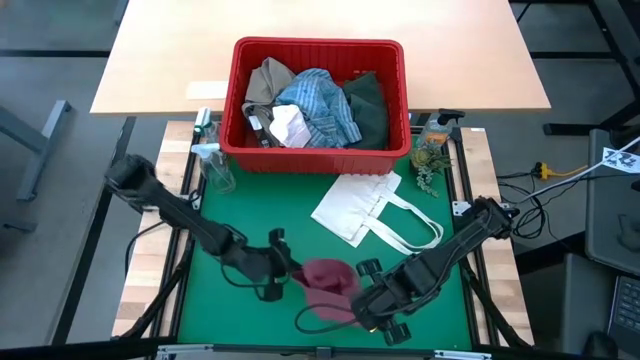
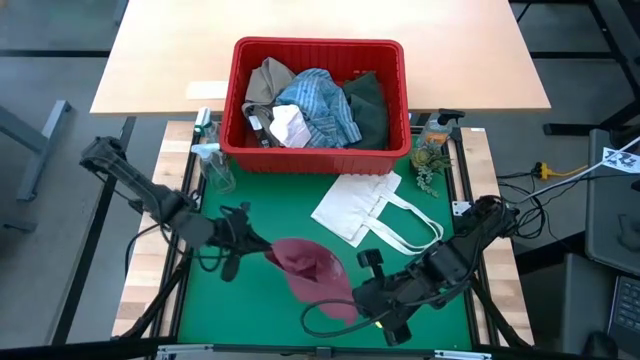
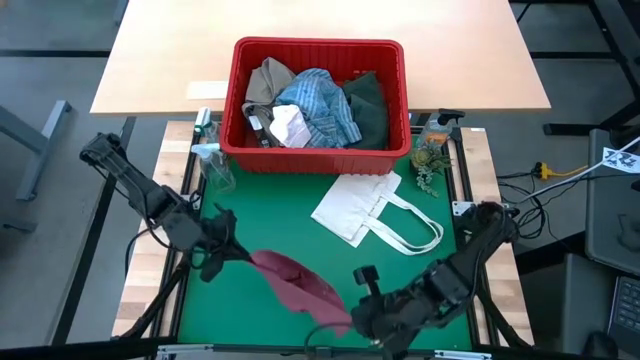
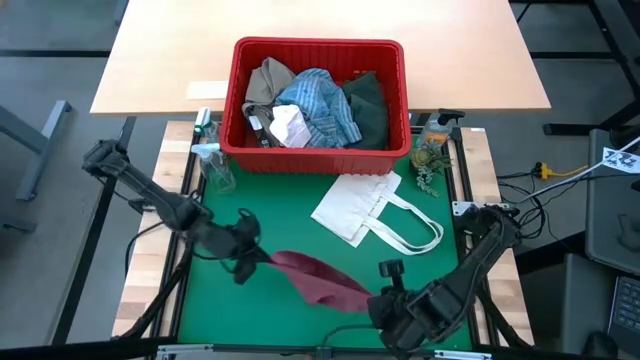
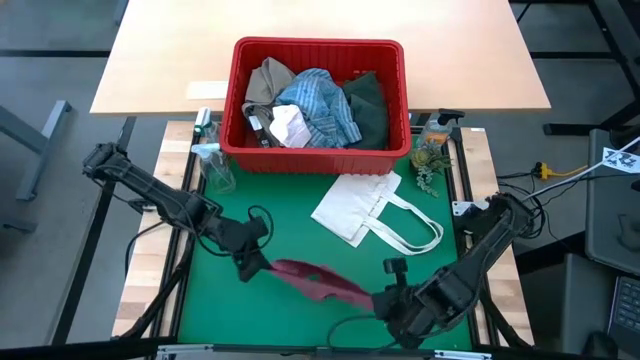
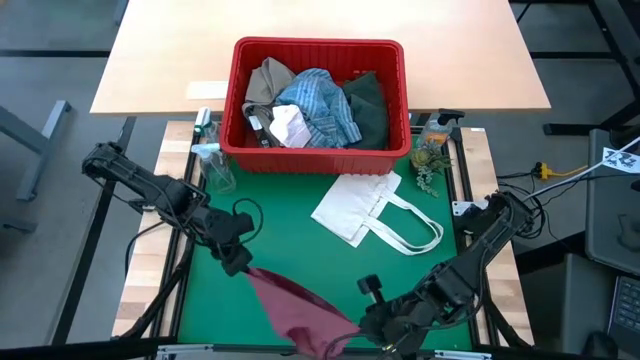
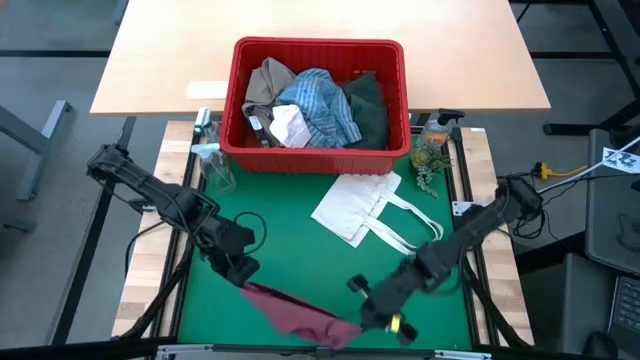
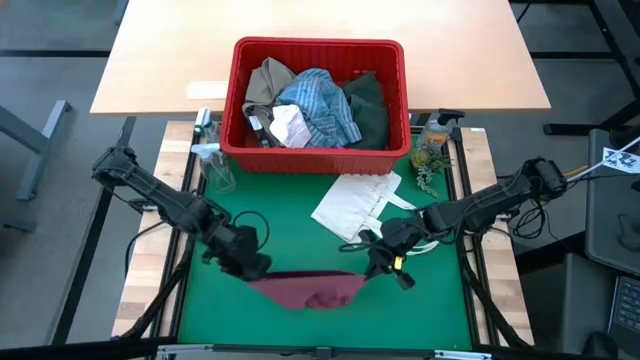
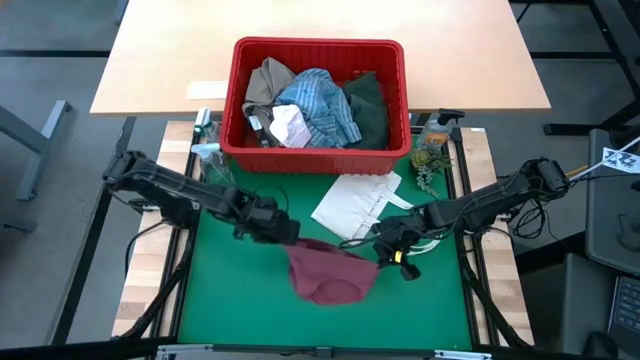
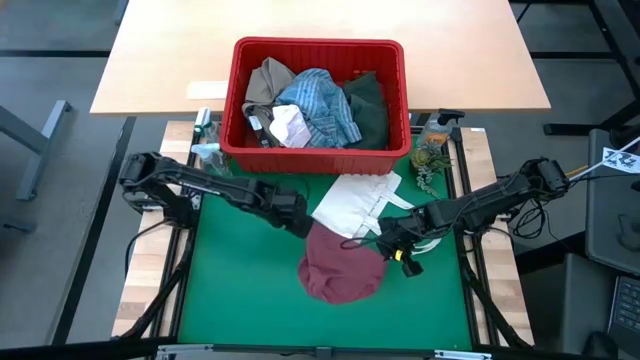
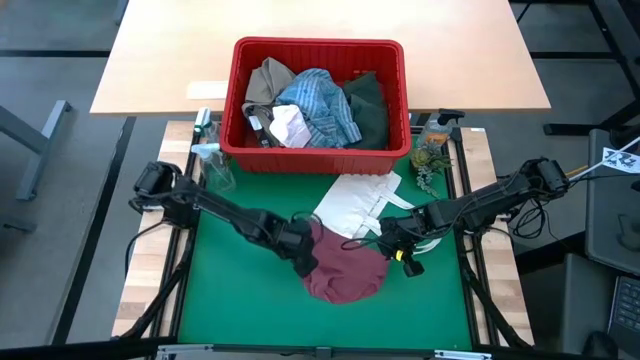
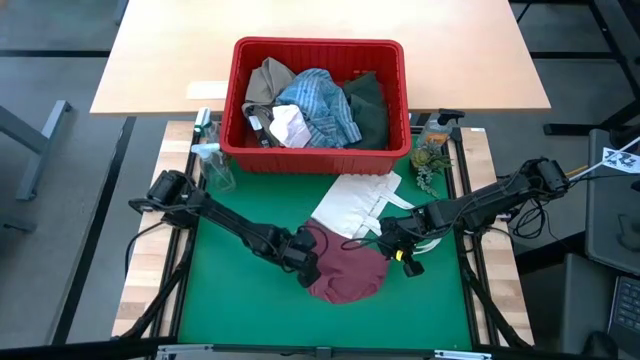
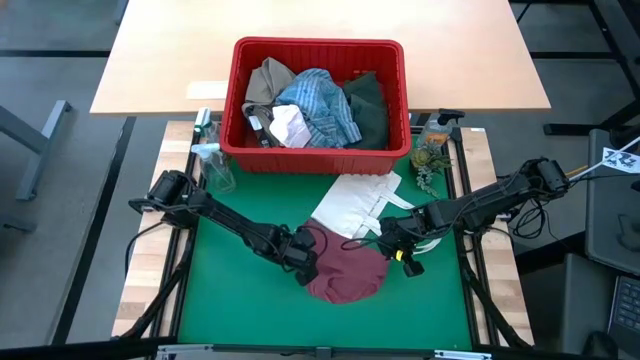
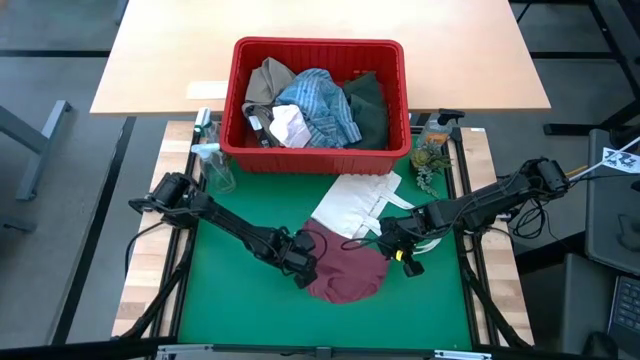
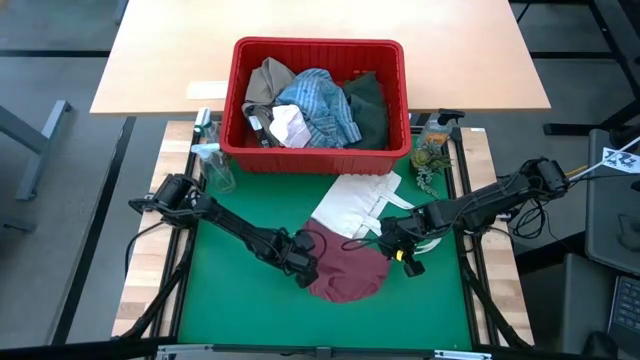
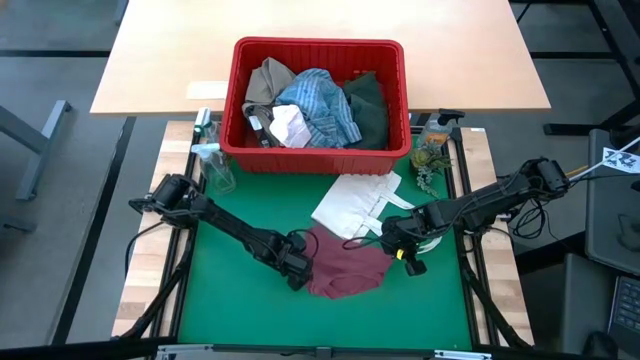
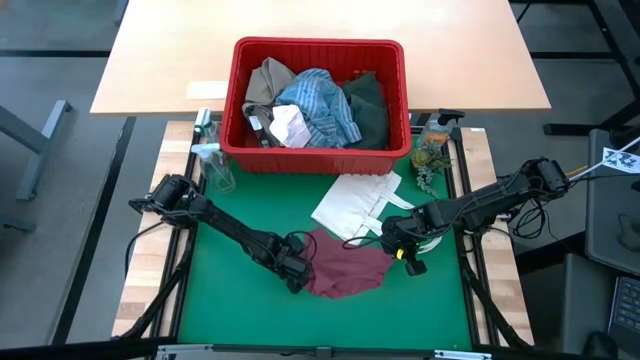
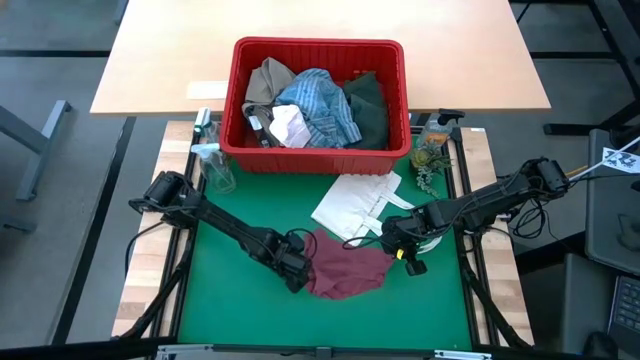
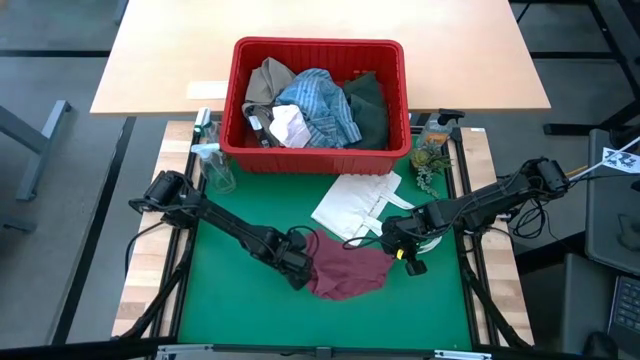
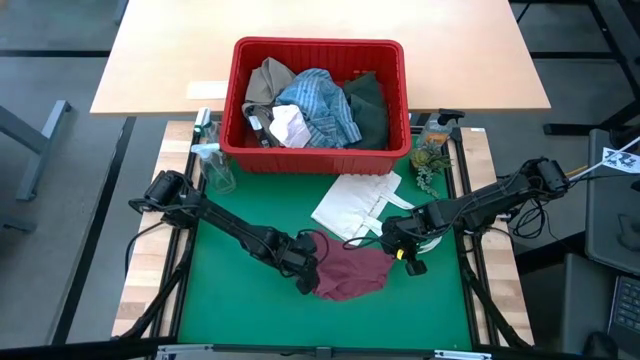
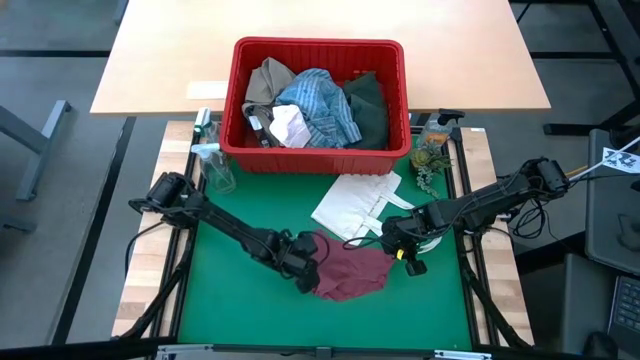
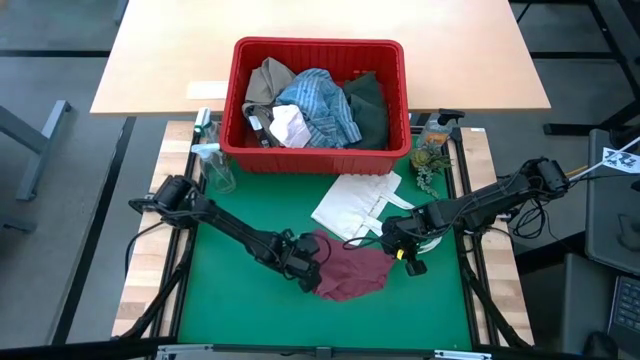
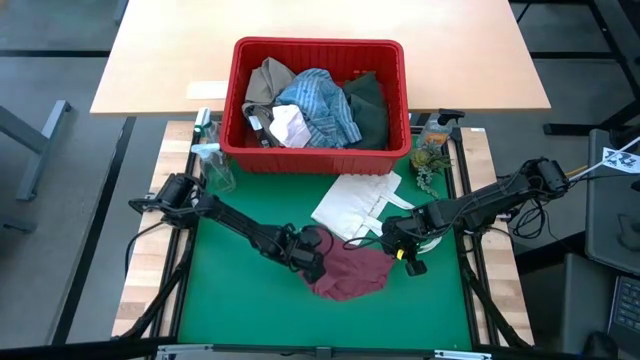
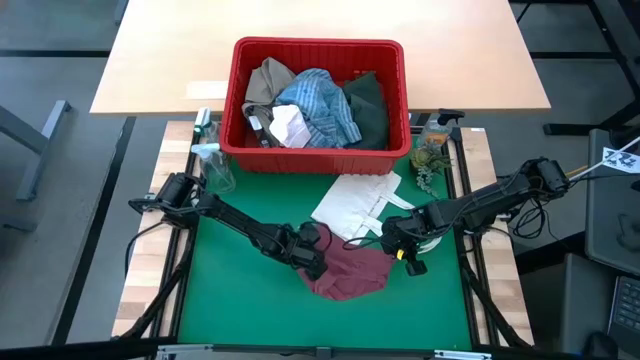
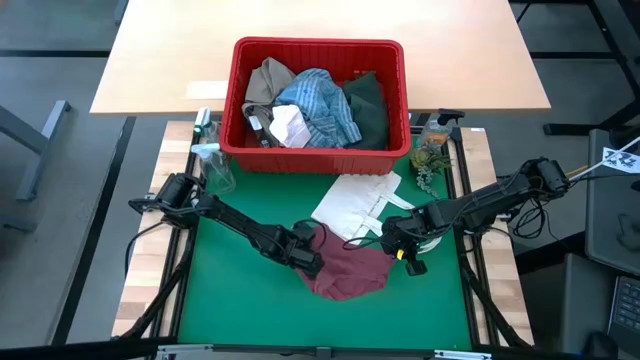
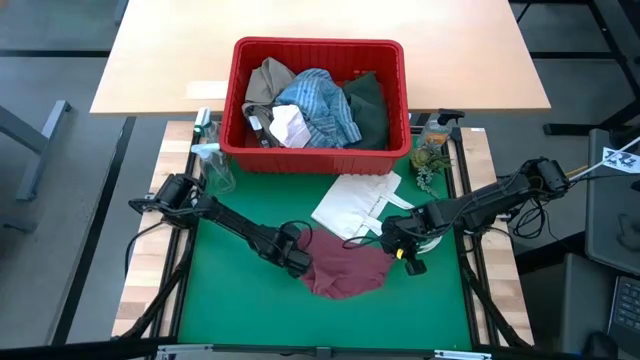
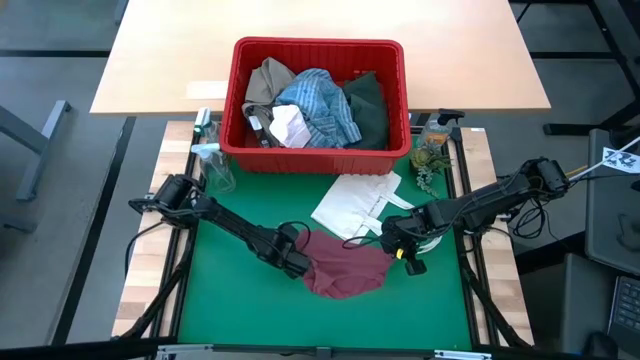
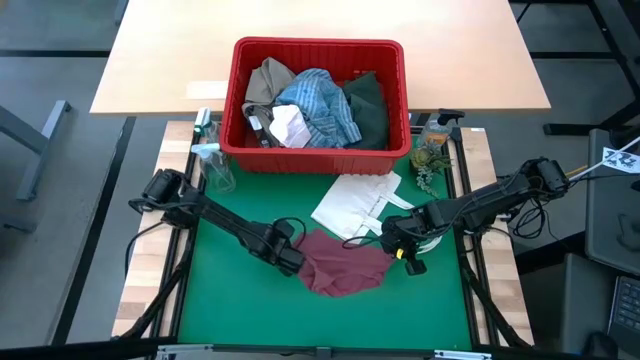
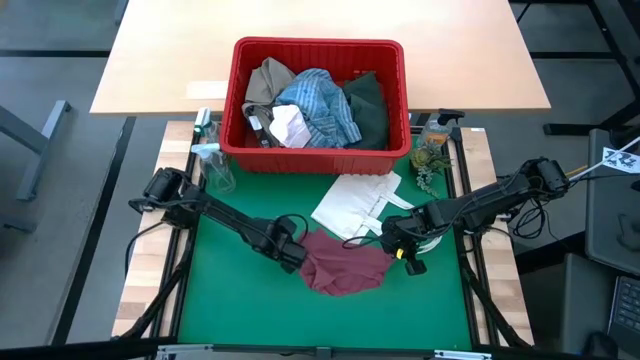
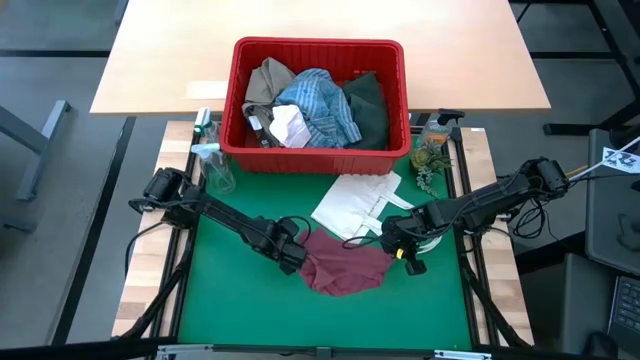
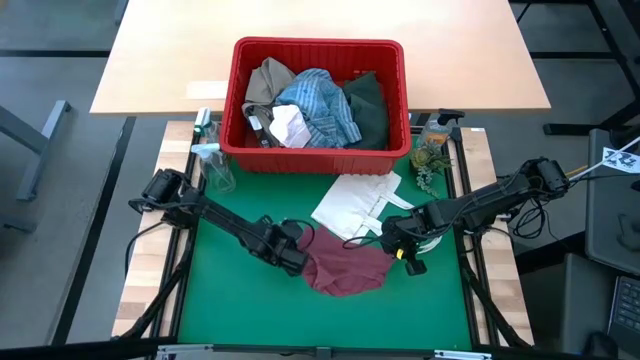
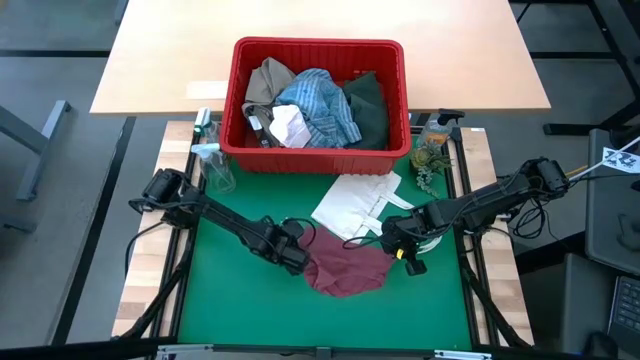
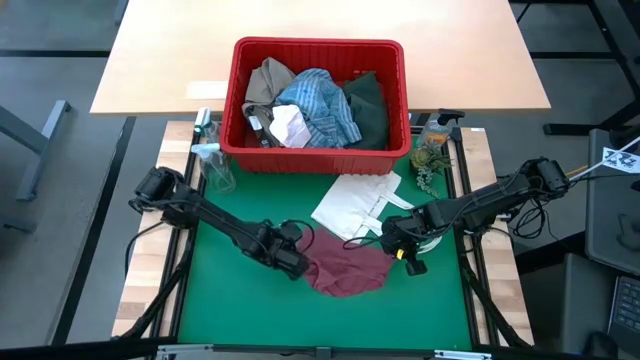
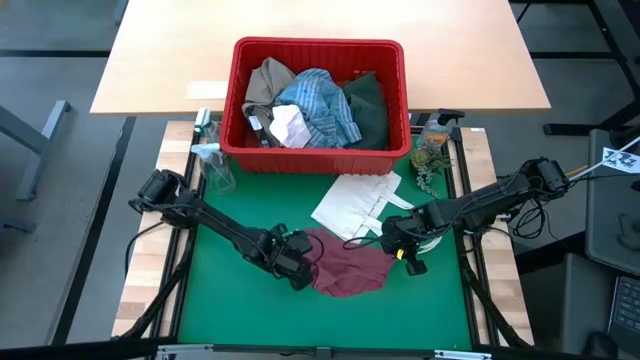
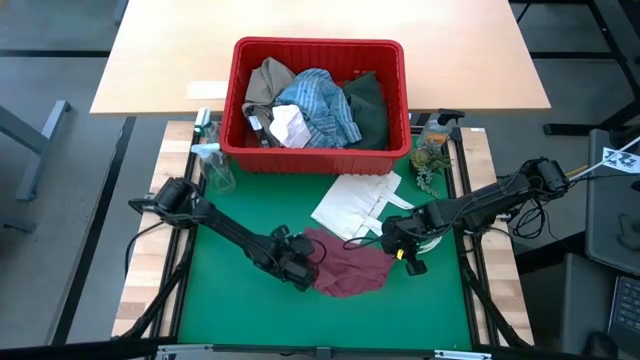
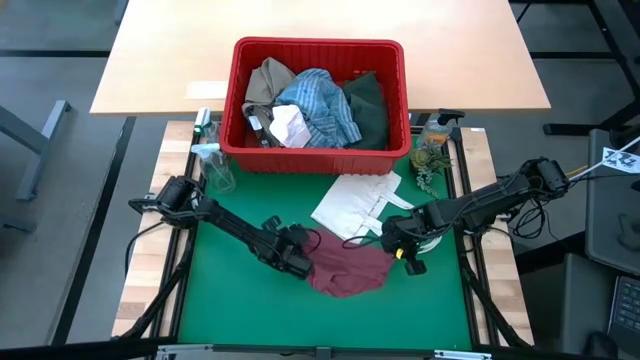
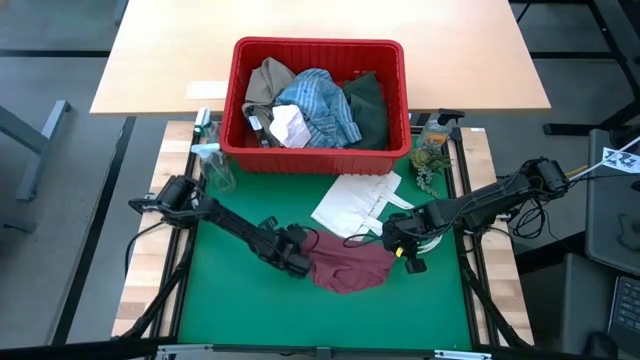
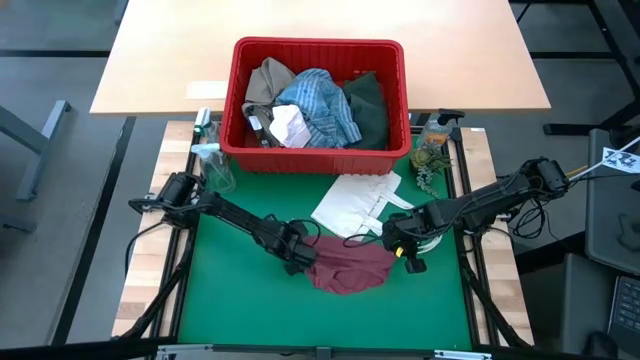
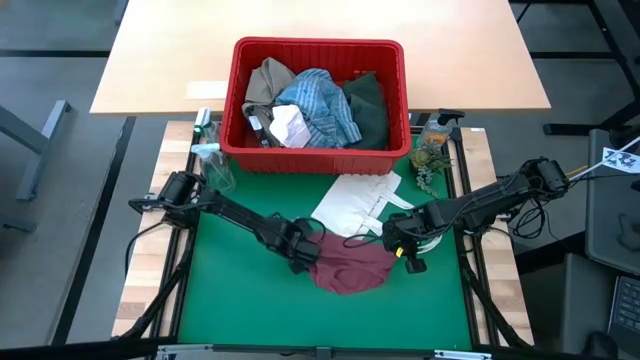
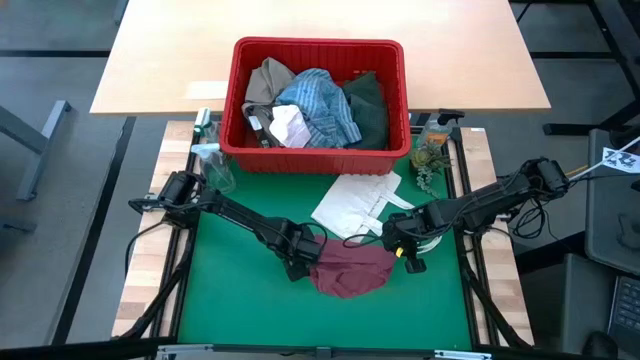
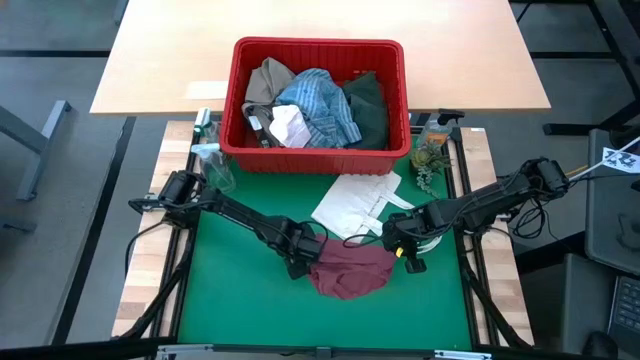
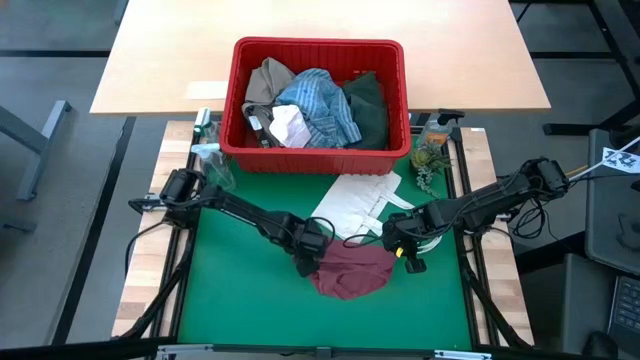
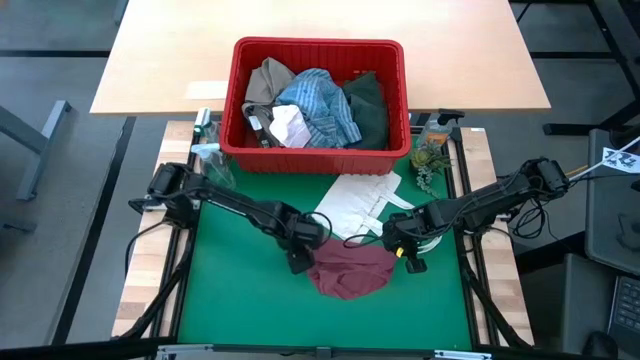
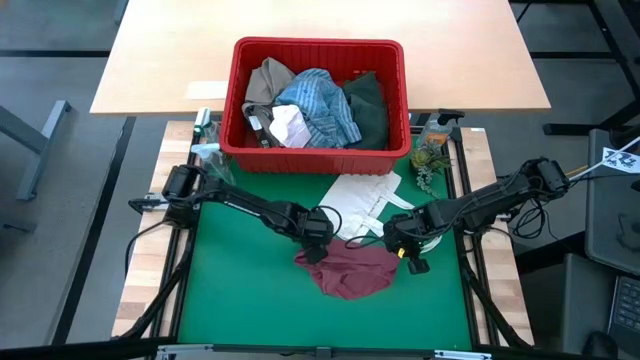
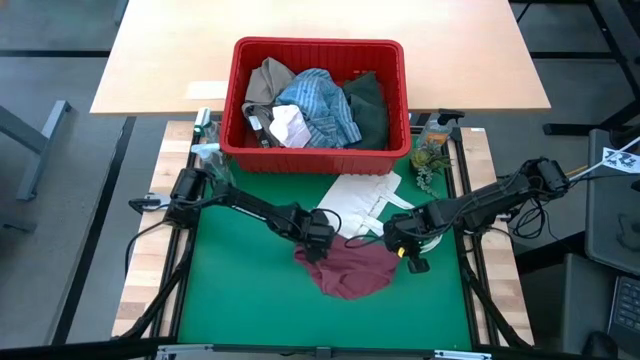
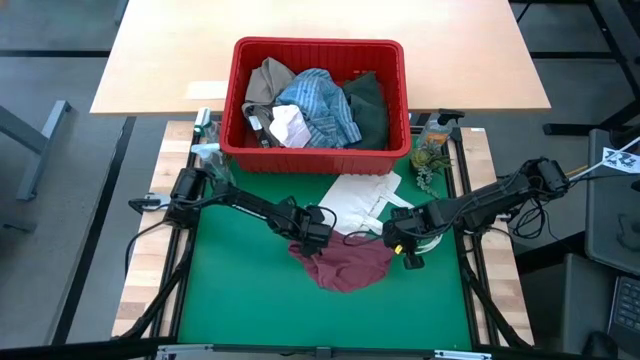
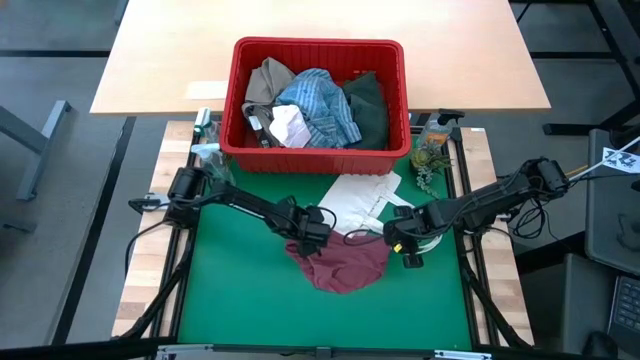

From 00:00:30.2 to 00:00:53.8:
Task: Fold Laundry from Bin
Remove the pink underwear from the red bin
